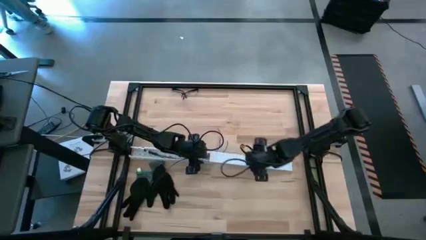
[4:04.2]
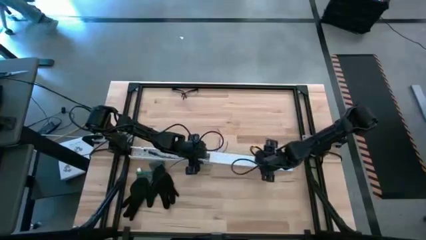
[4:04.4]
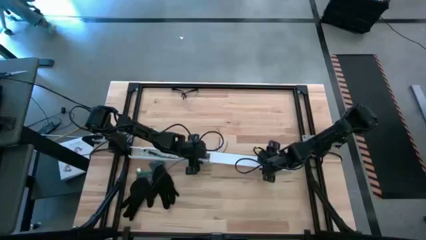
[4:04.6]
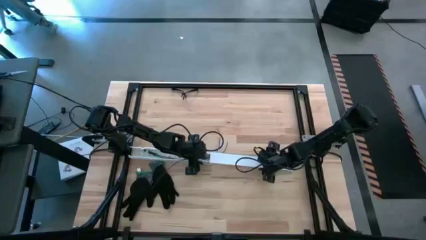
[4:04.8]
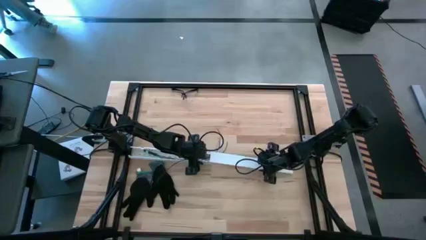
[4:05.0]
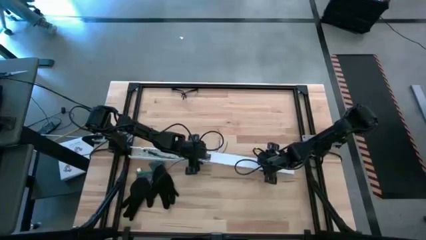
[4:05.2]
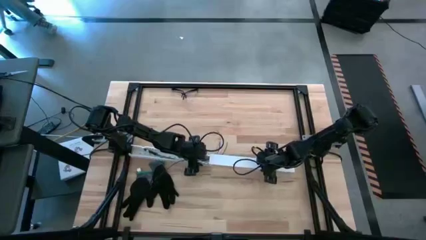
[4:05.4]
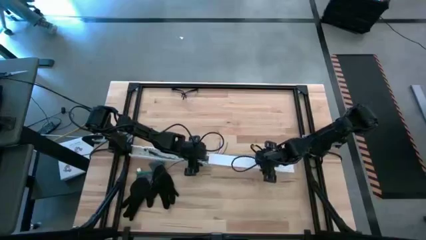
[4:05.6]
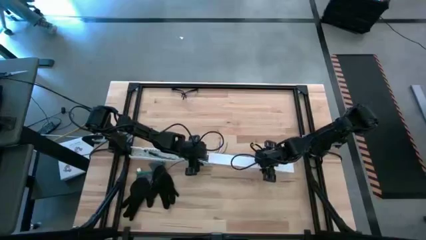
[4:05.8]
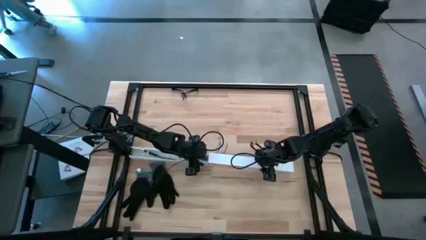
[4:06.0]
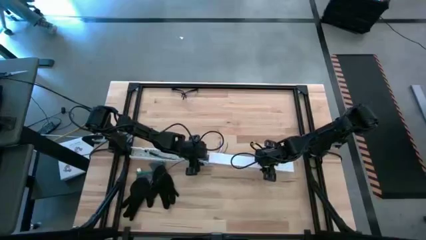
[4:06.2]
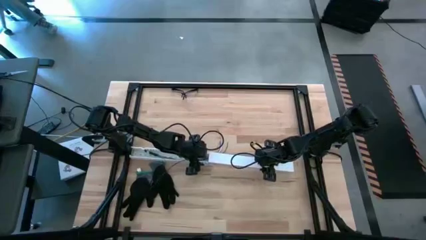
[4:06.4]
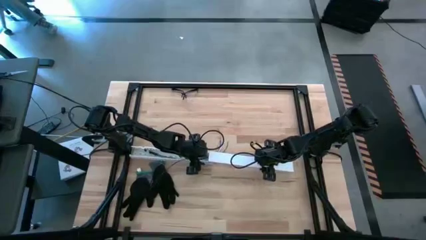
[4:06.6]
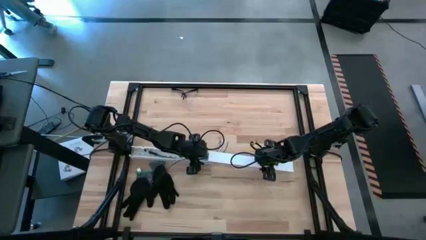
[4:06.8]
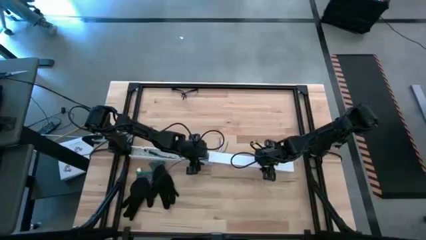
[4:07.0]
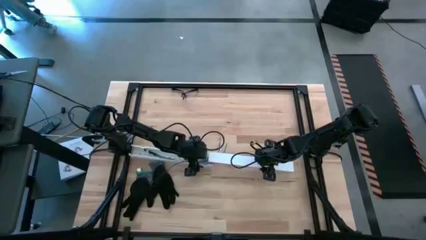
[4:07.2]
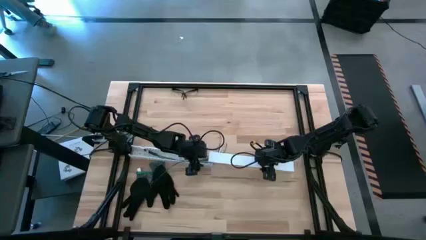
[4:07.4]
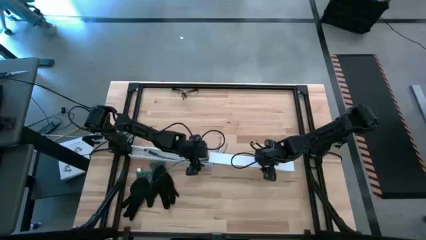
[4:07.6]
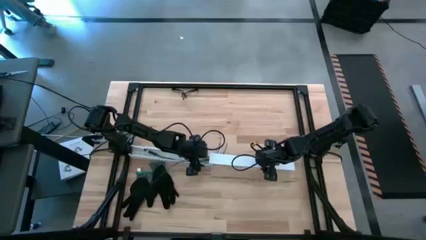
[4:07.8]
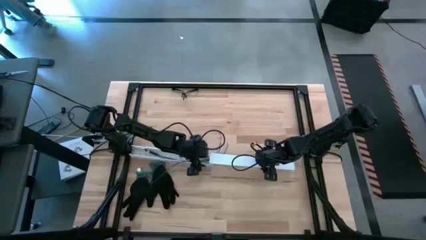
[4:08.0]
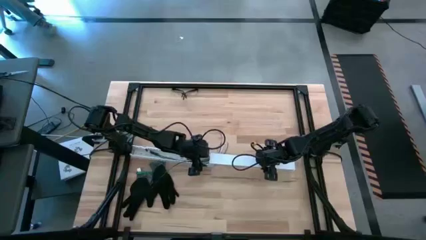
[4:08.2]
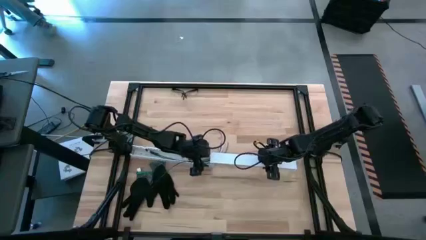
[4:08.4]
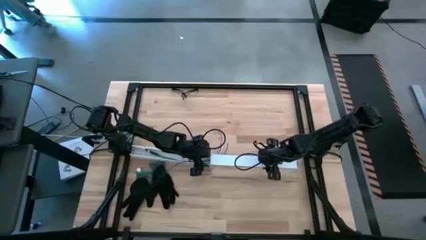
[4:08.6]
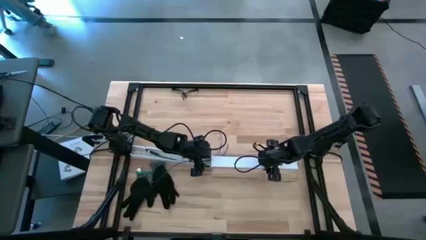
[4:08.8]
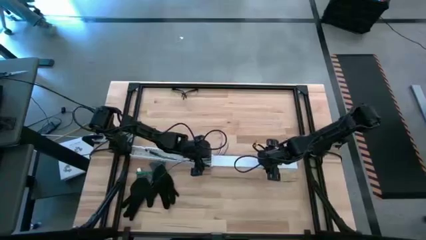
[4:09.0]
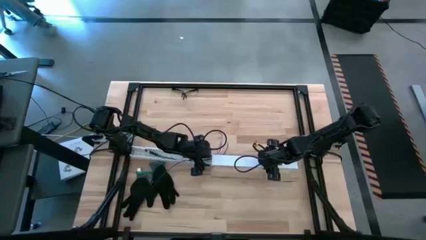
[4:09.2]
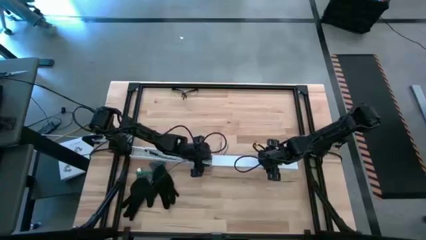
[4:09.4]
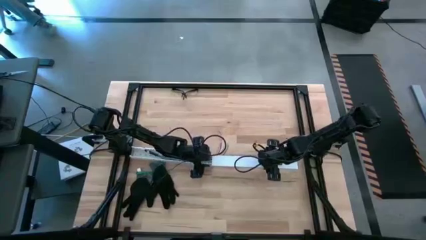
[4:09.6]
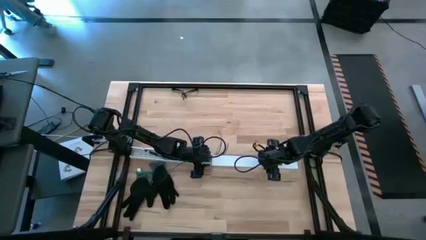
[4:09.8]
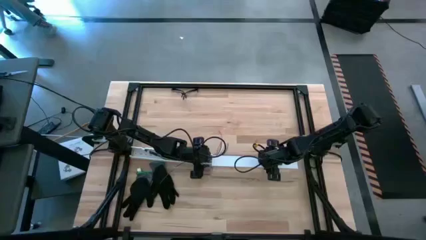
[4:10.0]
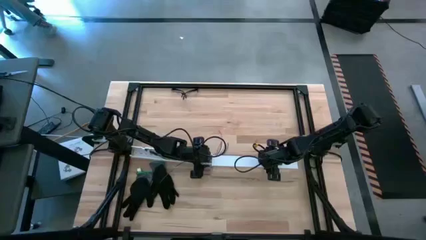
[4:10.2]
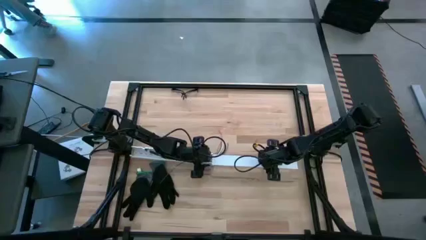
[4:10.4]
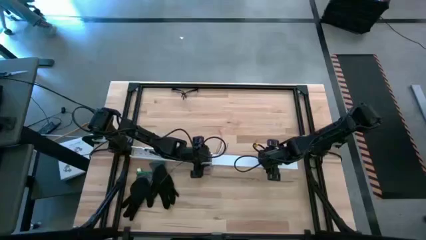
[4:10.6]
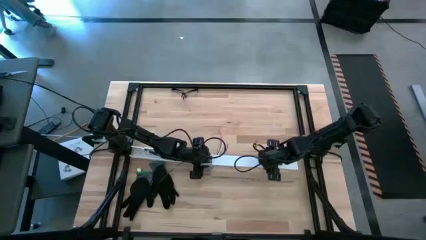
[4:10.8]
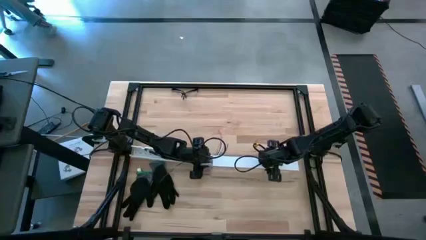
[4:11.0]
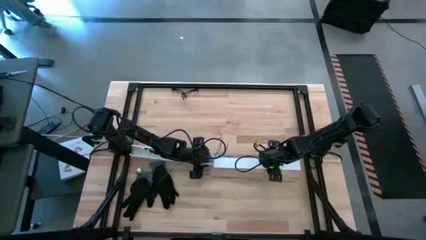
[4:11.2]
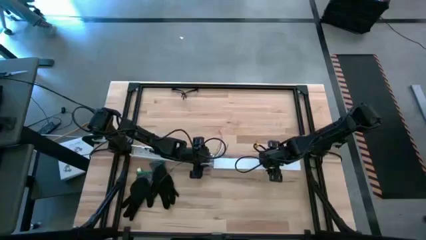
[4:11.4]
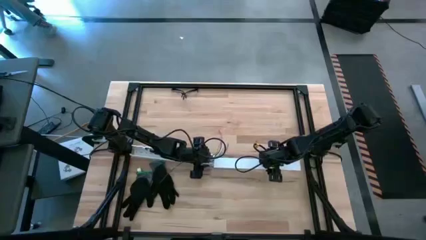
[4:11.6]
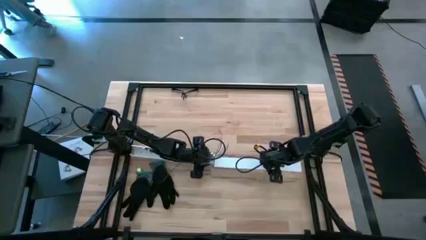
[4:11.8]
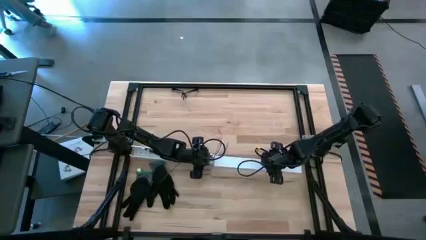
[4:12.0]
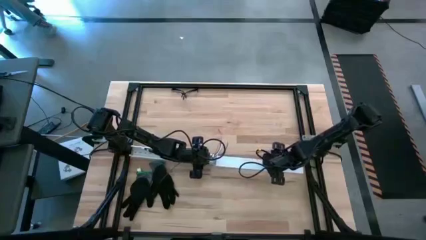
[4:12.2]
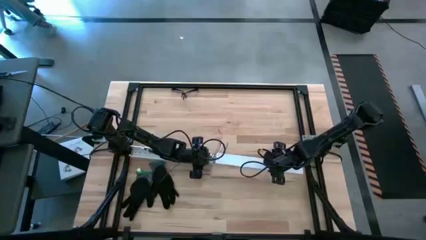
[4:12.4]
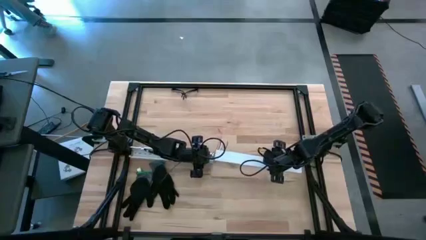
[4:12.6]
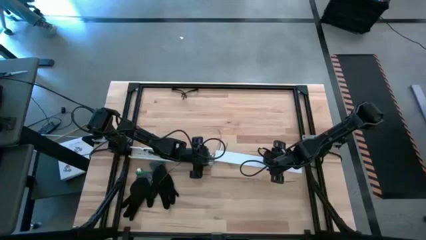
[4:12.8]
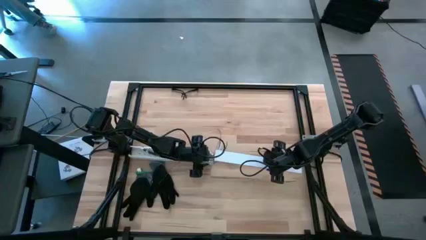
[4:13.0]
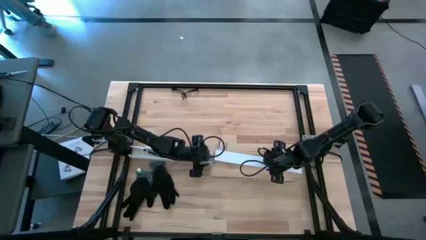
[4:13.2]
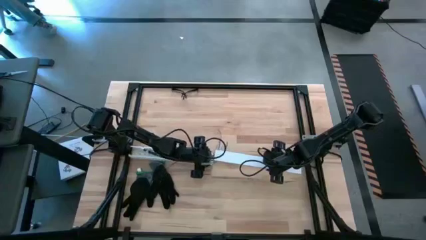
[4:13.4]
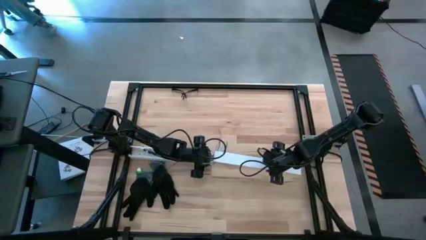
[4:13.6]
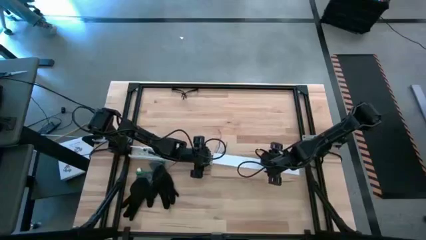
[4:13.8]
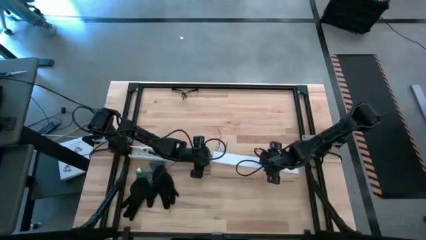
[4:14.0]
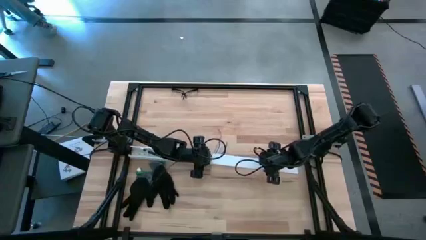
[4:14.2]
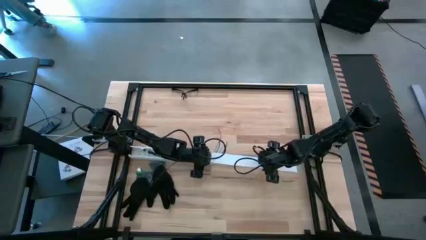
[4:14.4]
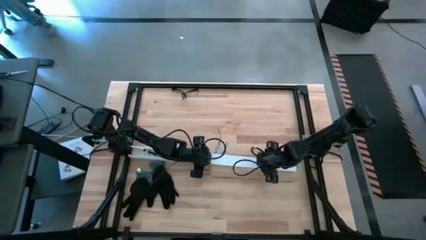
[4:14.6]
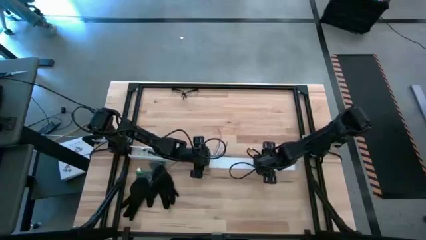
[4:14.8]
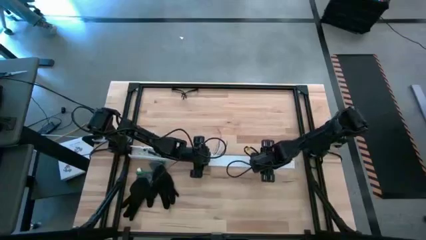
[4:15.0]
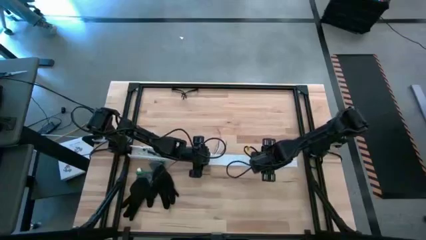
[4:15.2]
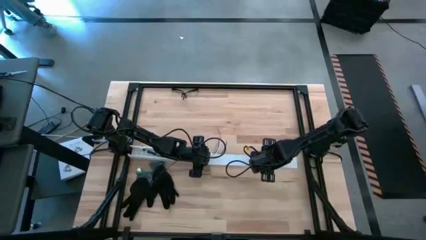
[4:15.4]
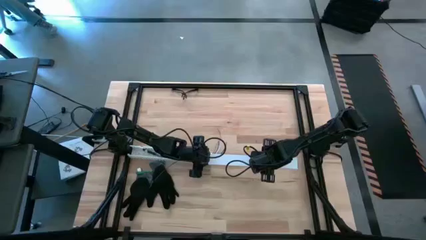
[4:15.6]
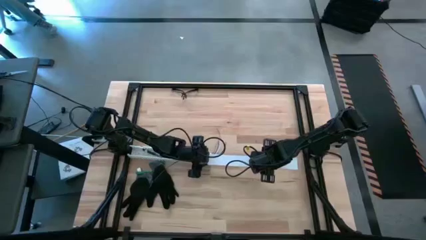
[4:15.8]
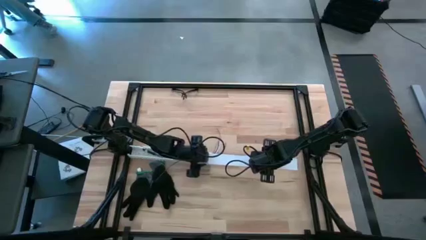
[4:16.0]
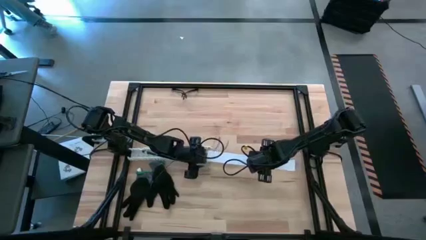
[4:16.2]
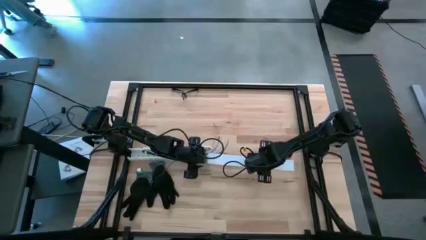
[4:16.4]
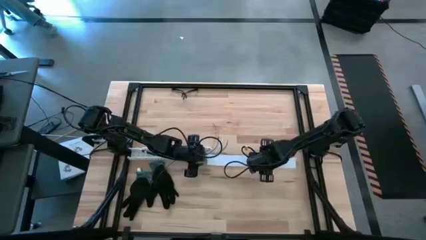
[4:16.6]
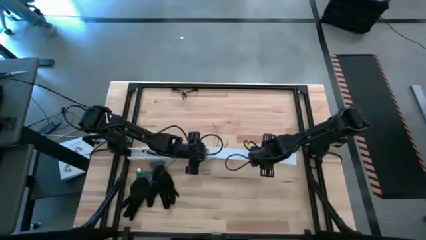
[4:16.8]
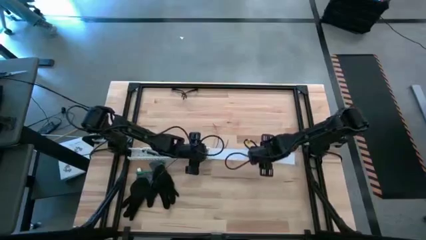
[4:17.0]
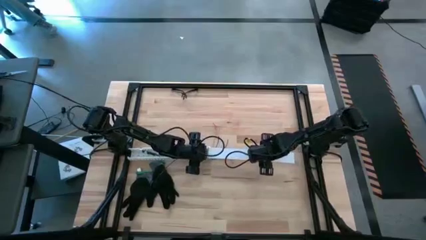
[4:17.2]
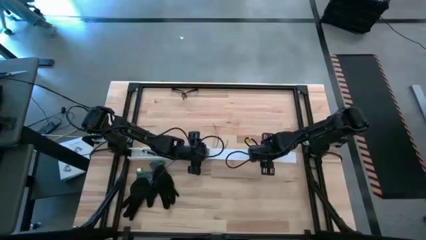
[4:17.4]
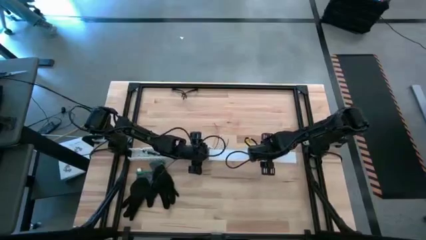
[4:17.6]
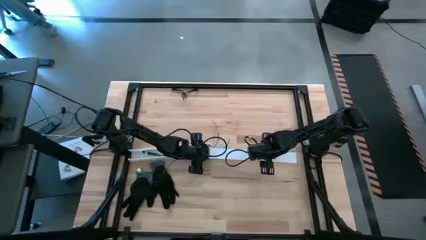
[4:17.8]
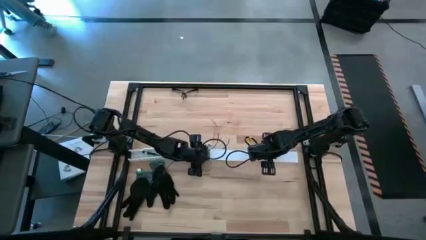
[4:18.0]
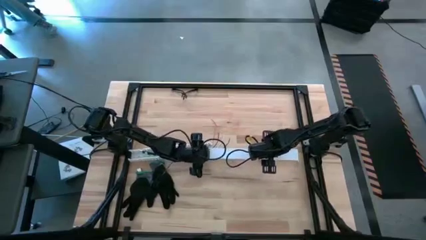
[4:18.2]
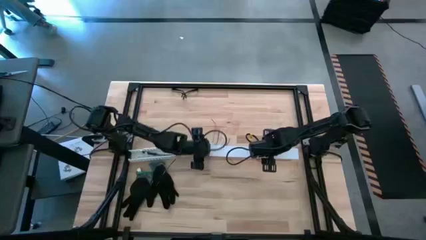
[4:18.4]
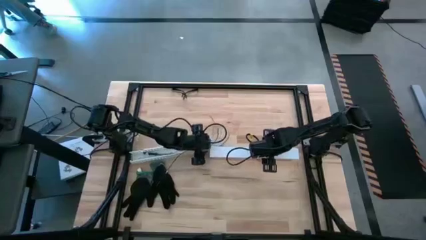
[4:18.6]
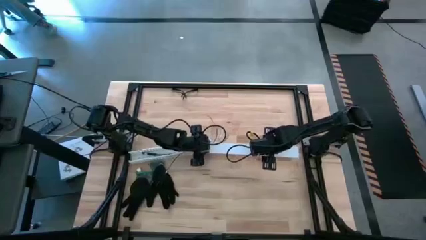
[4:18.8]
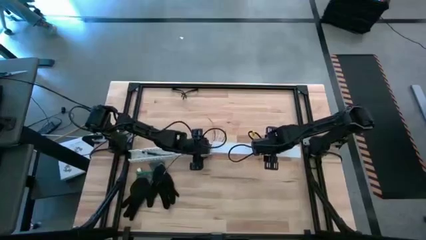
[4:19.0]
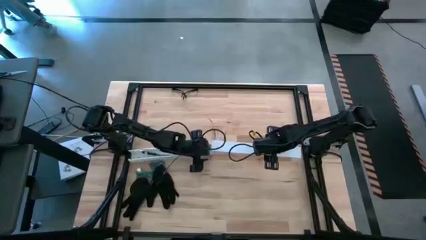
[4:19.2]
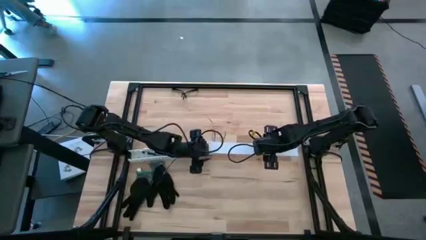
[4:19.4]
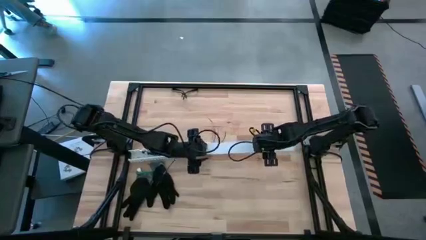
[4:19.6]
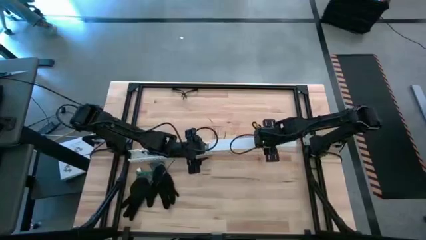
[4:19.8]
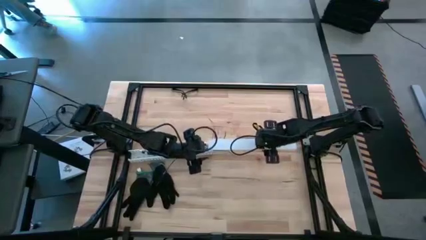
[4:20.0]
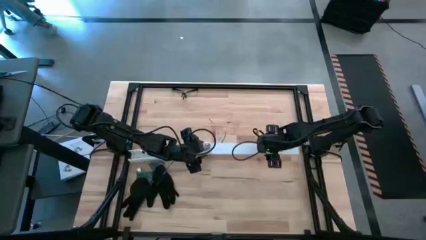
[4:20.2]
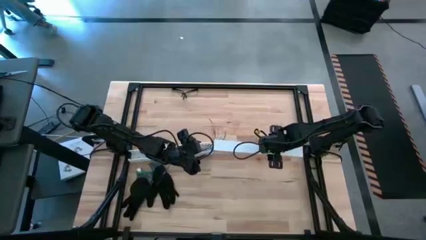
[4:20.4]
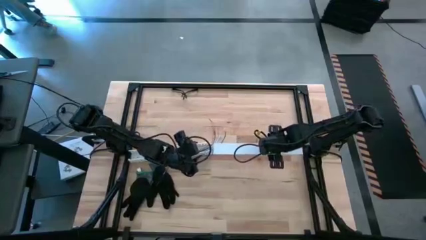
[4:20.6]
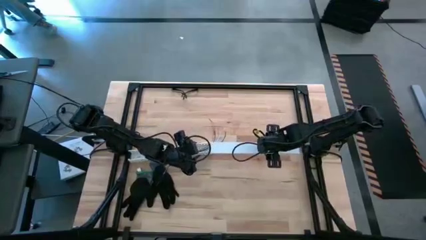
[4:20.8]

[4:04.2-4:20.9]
Task: Ziptie cables
Close the white cable duct
